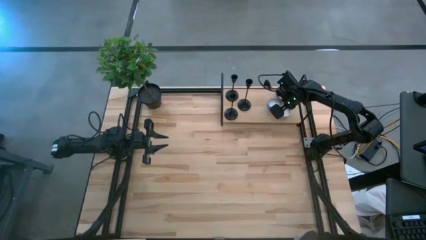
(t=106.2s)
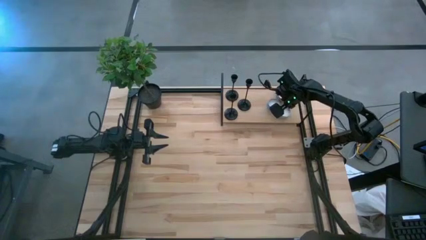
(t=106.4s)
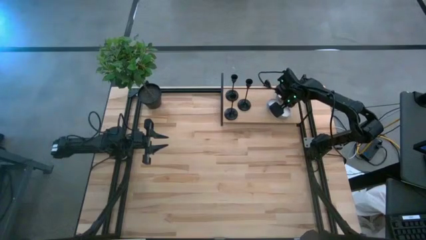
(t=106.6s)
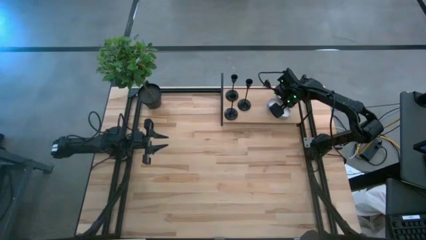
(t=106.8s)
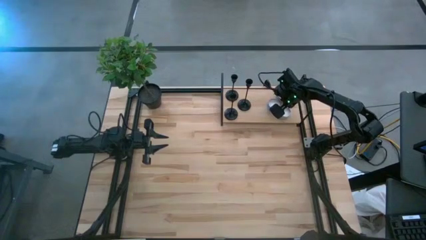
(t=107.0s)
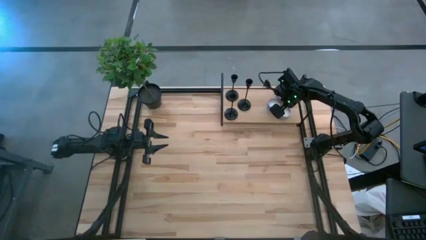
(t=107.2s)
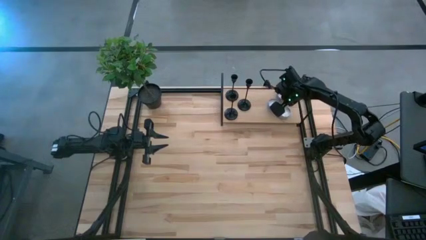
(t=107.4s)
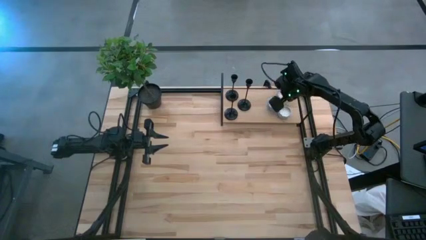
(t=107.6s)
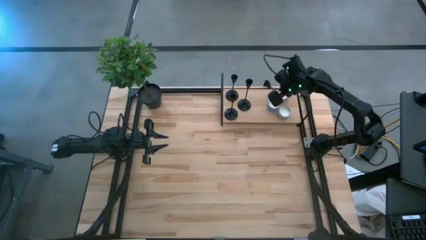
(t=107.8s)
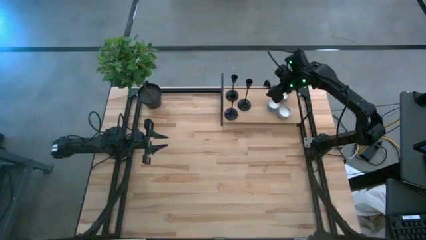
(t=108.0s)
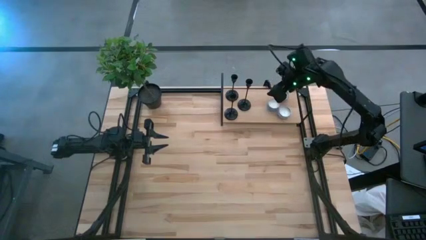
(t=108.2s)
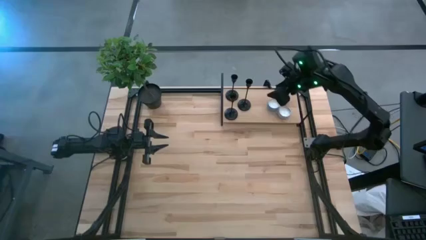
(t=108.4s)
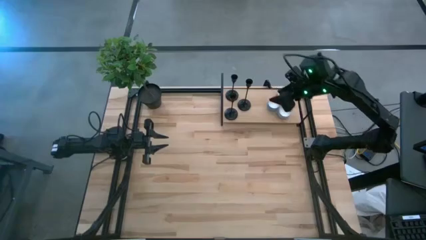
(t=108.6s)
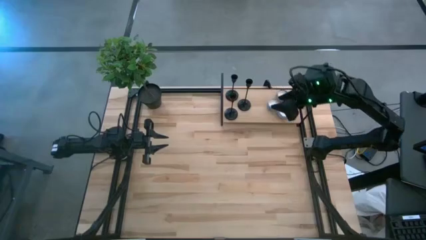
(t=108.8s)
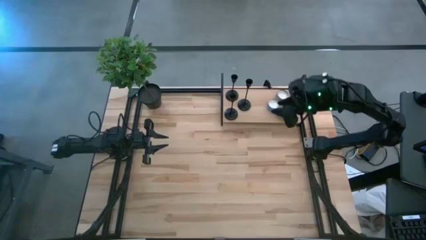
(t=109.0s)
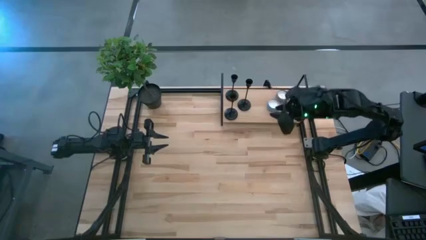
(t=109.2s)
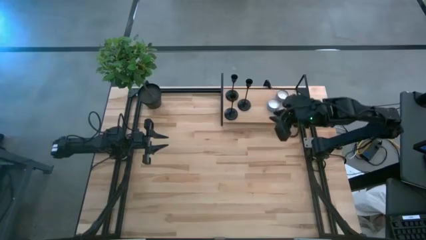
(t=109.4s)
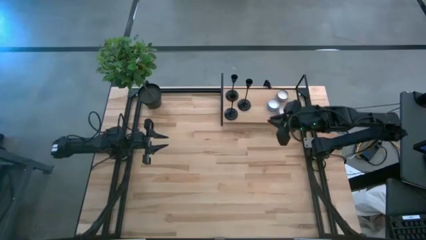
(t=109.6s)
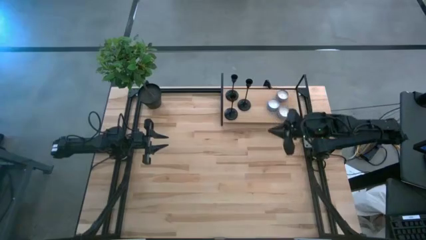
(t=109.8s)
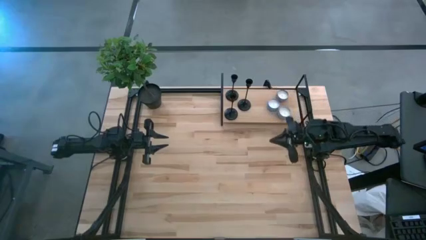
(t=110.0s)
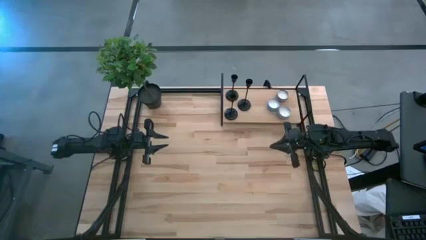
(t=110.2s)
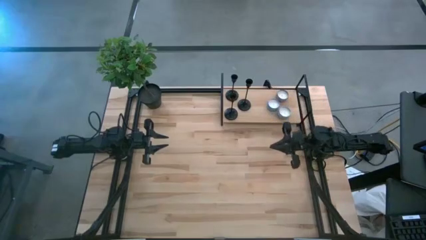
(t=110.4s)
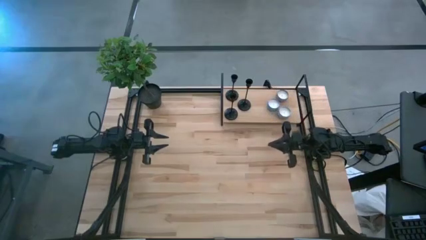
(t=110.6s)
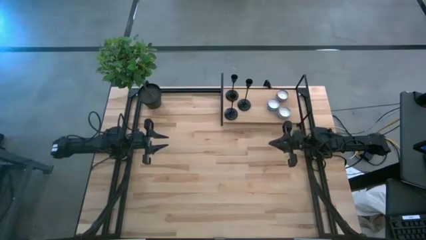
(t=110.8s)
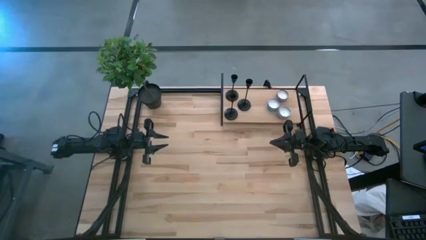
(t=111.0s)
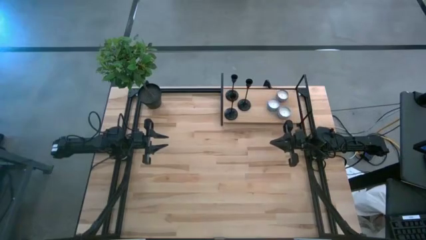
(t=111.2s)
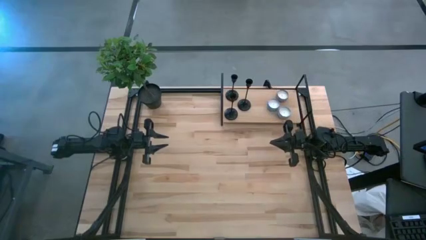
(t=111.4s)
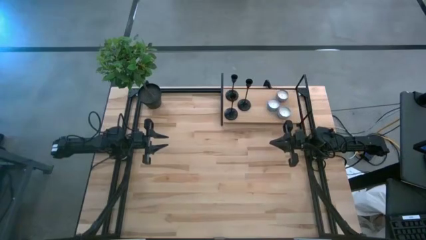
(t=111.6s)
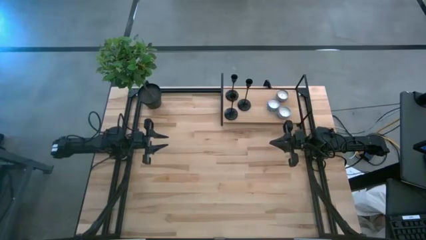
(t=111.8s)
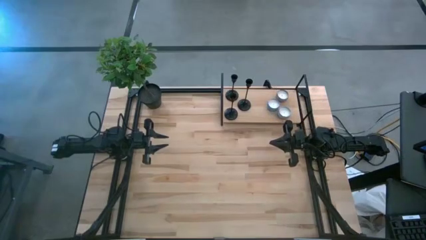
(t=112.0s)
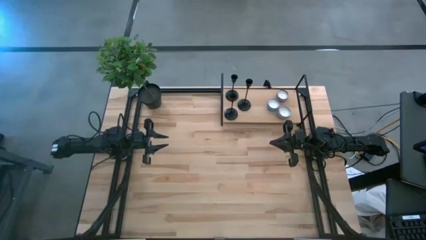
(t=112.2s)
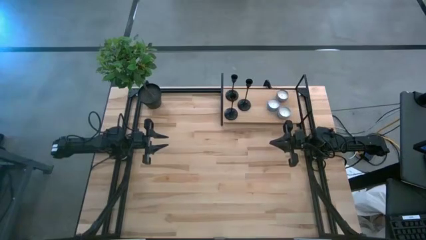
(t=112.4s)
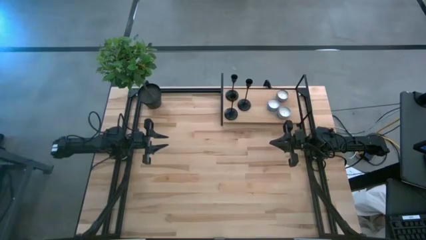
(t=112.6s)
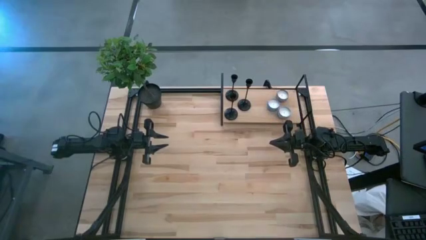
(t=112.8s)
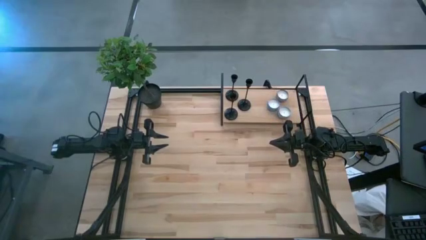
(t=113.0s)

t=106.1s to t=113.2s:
Task: Pick & Place candle stick holders
Return to Home Position

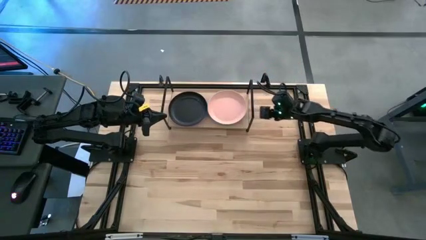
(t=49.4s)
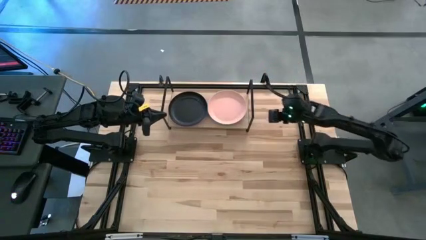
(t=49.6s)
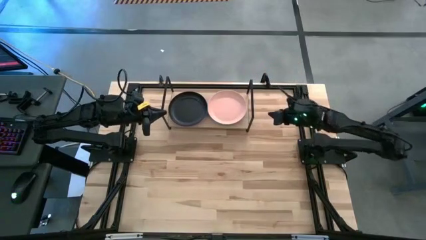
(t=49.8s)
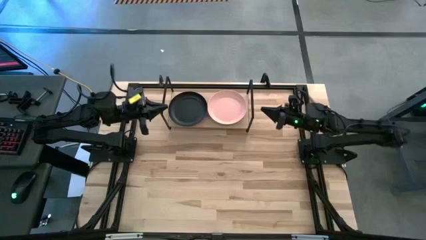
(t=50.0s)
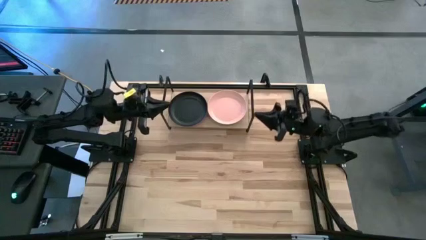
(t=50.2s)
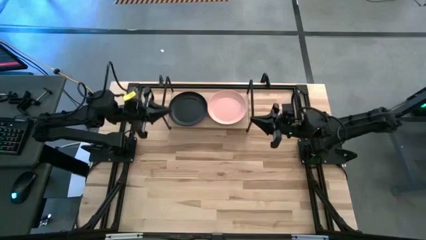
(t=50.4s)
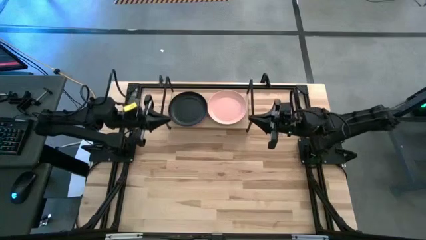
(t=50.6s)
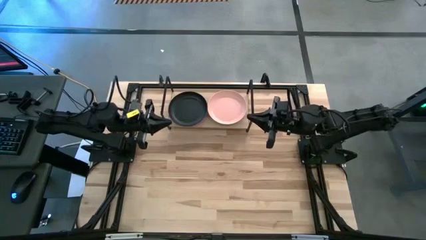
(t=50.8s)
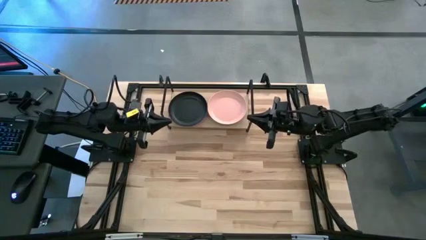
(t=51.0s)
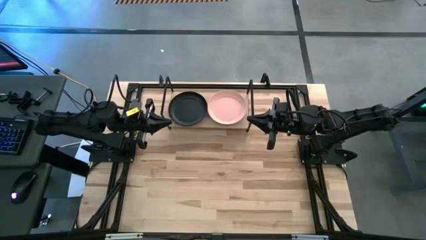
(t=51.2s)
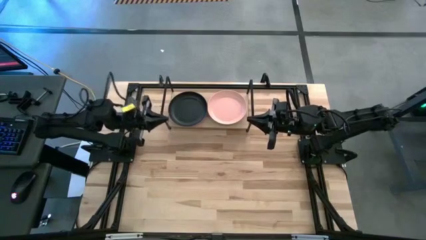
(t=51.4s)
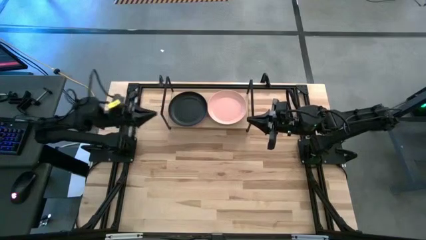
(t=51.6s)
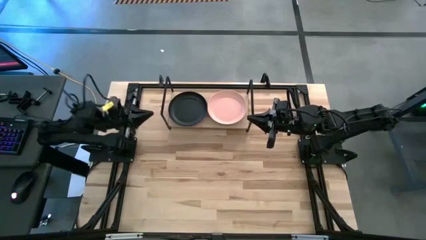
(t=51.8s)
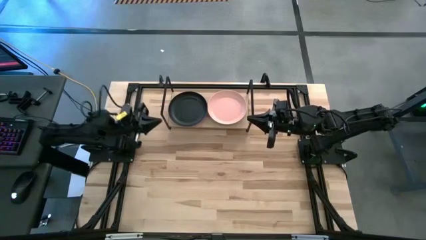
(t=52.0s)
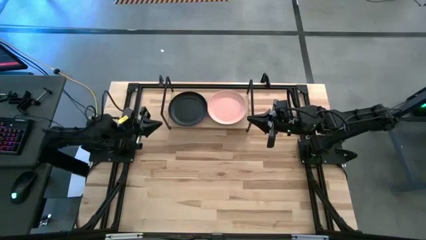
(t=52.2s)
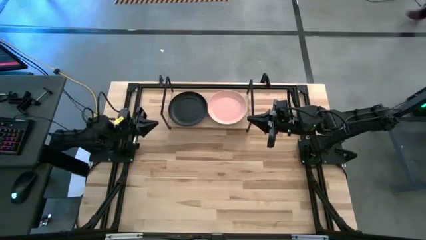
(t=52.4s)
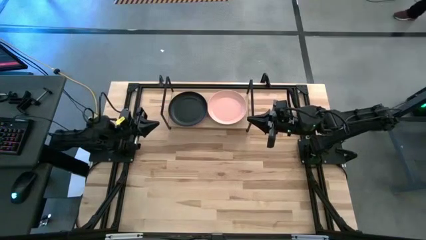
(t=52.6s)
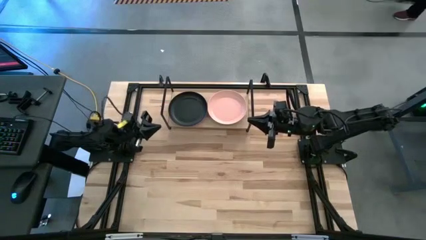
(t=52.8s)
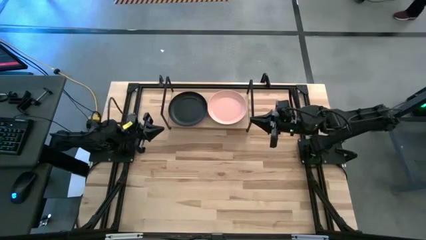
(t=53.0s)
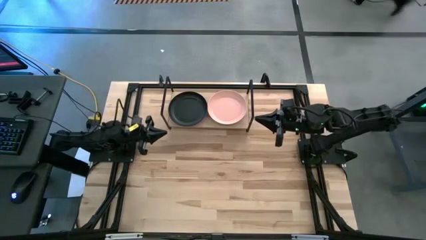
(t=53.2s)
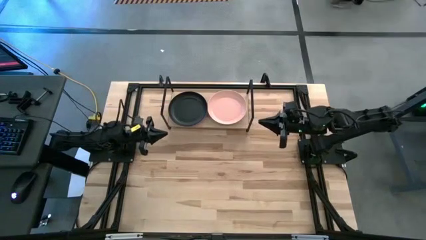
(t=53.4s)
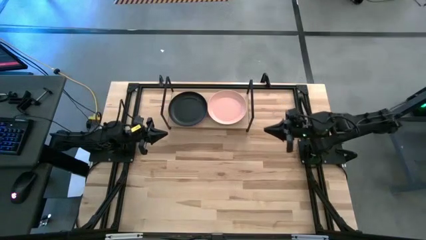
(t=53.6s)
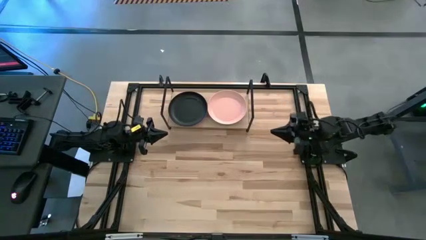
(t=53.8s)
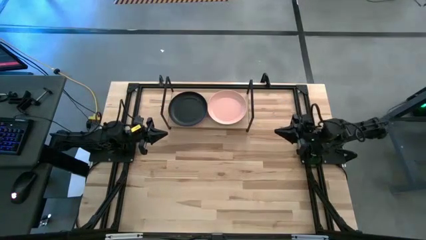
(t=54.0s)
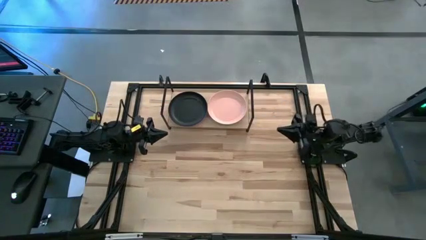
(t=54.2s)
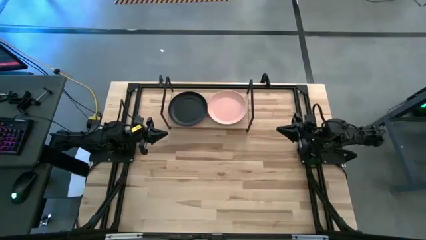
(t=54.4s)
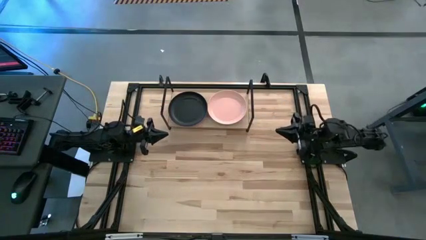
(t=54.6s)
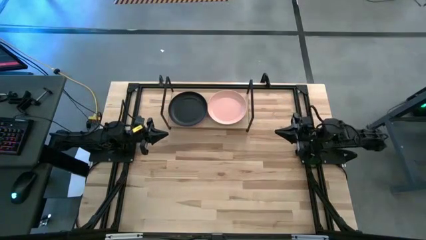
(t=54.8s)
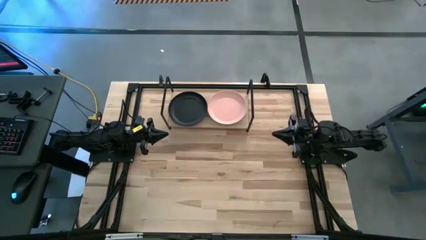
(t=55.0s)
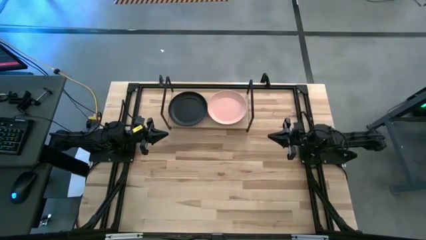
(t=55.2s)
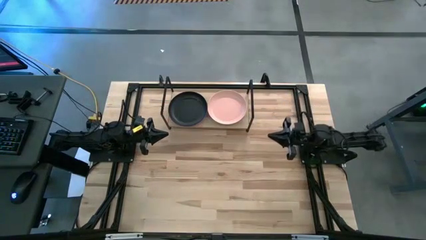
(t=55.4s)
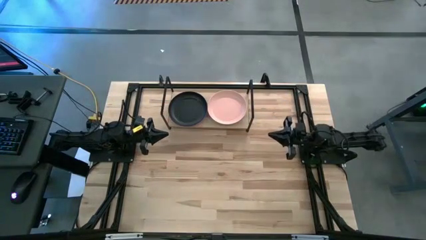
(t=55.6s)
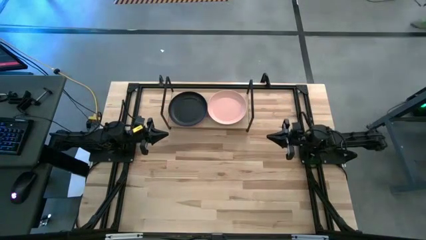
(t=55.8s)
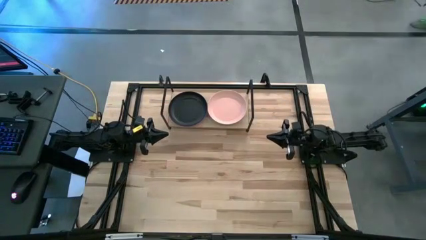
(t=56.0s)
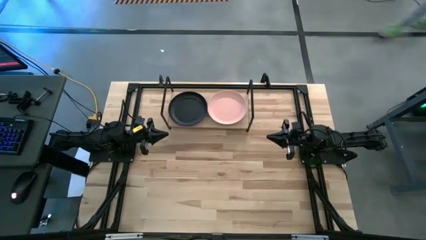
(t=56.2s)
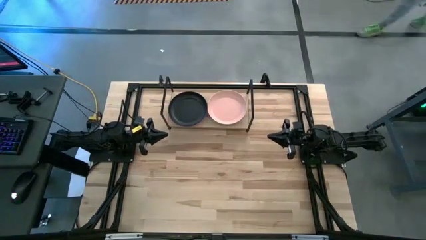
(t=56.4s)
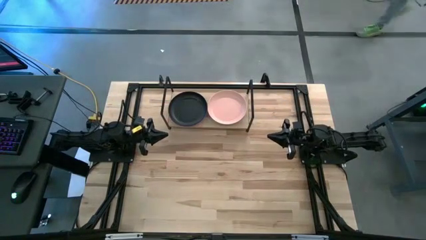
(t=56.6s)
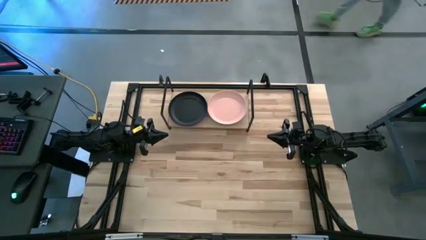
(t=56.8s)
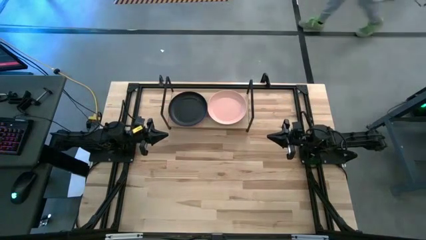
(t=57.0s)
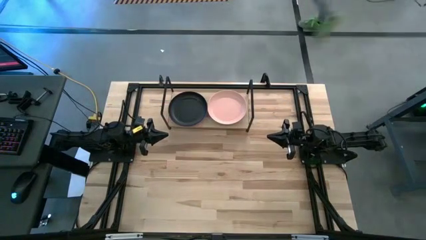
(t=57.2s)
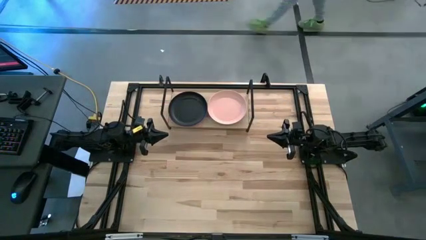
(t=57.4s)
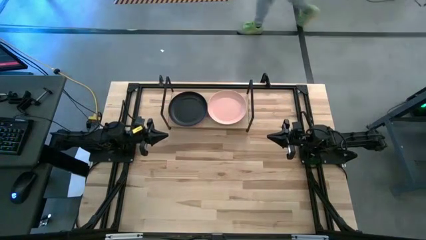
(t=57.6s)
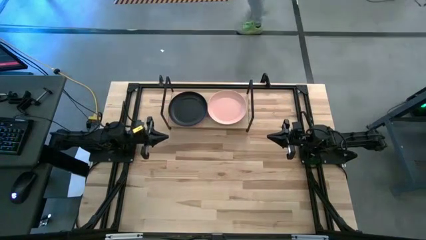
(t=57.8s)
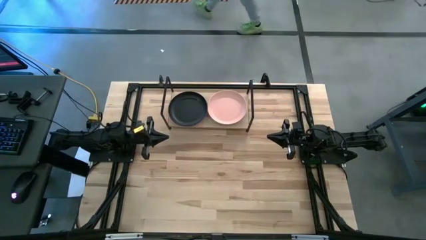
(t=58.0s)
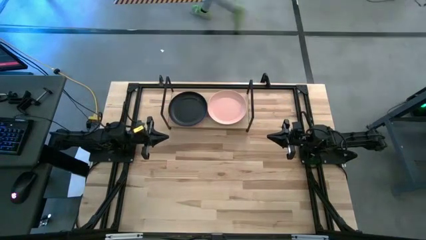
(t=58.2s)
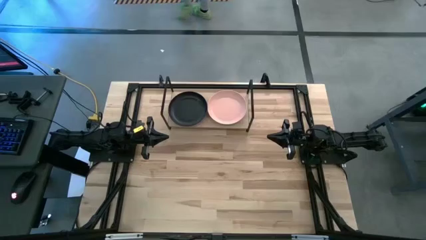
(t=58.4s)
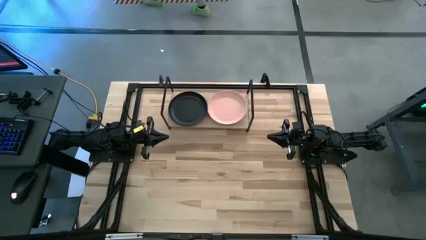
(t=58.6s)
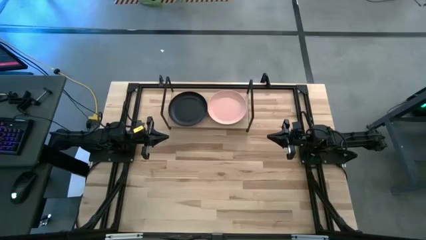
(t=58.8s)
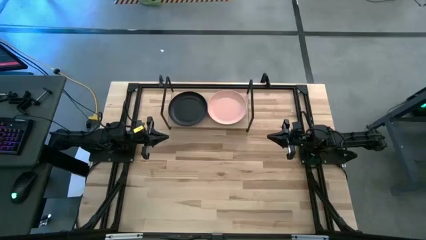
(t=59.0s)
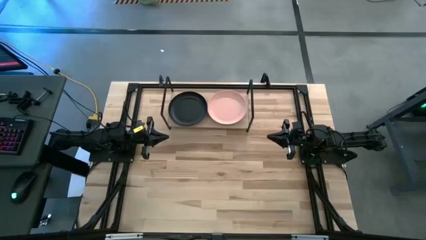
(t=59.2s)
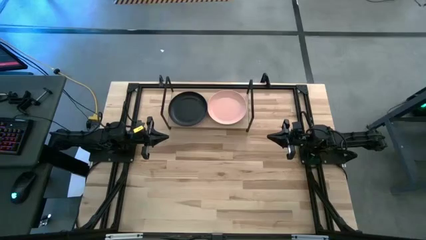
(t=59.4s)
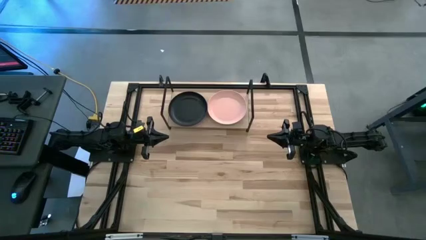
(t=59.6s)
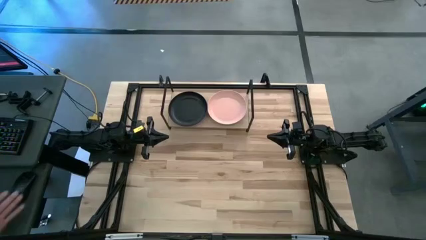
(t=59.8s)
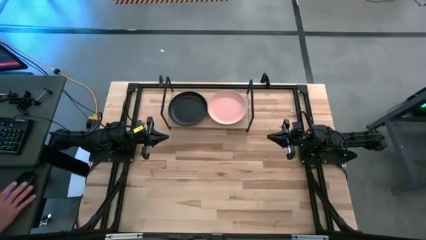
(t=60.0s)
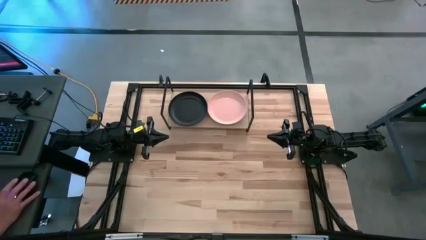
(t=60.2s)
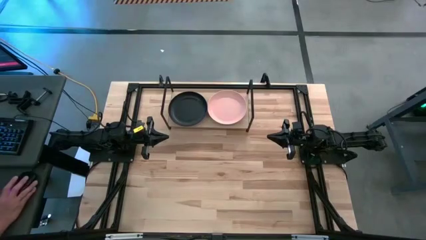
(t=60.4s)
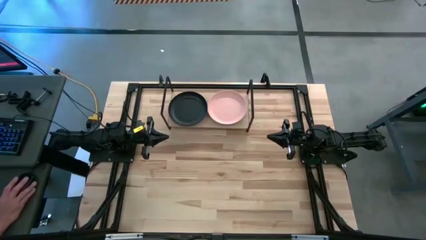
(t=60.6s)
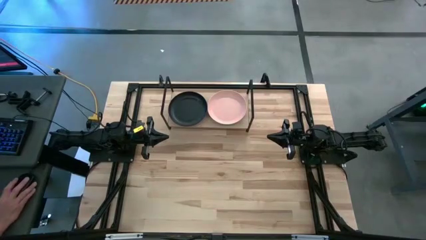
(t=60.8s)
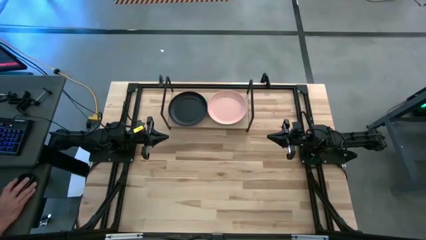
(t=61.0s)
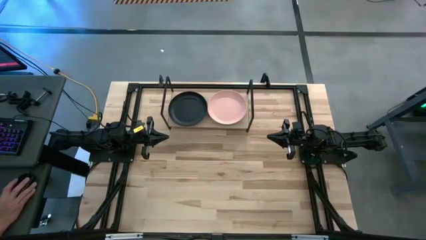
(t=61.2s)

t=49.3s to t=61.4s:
Task: Place and stack plates onto a shelf
Return to Home Position
